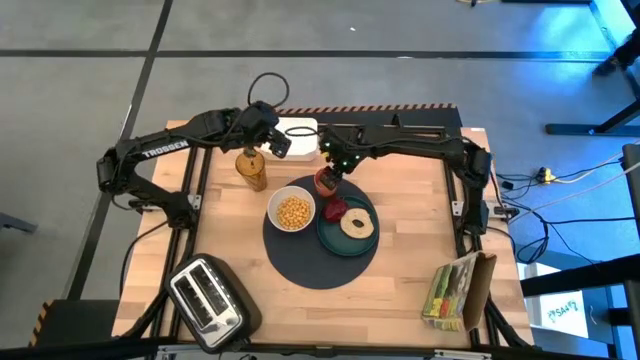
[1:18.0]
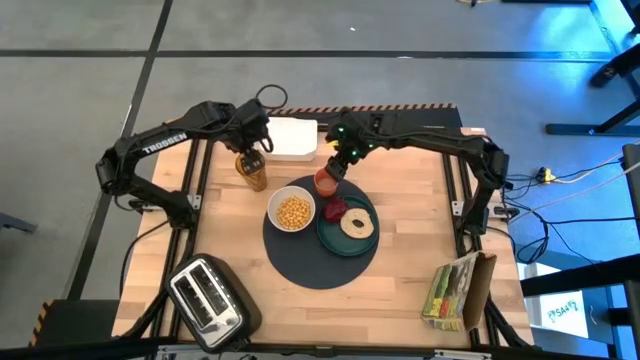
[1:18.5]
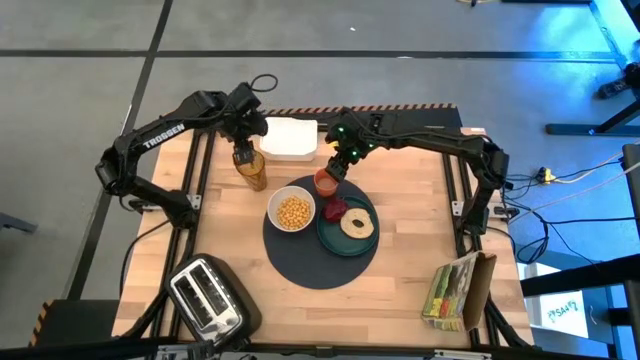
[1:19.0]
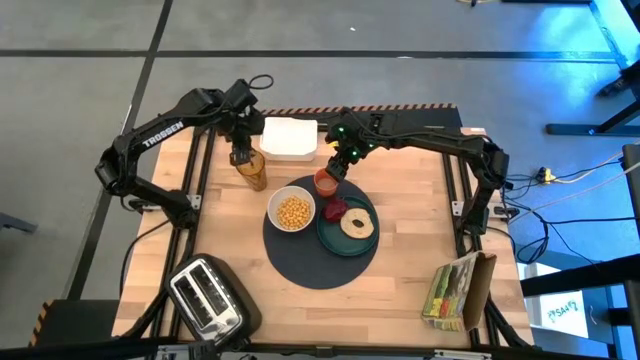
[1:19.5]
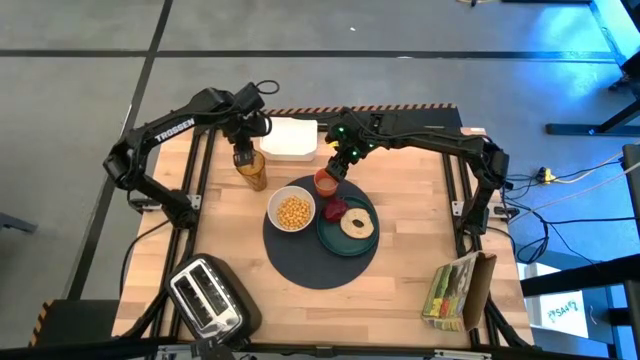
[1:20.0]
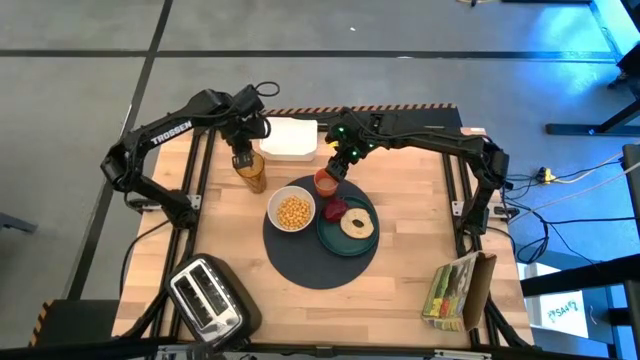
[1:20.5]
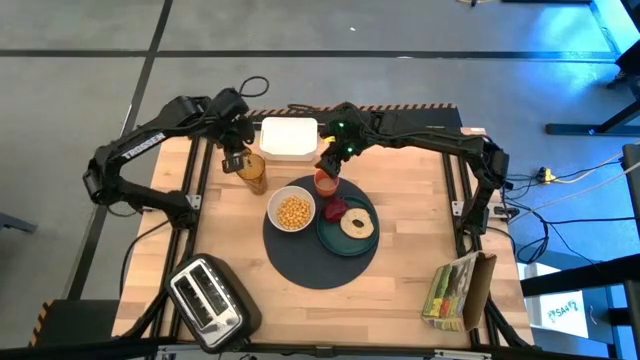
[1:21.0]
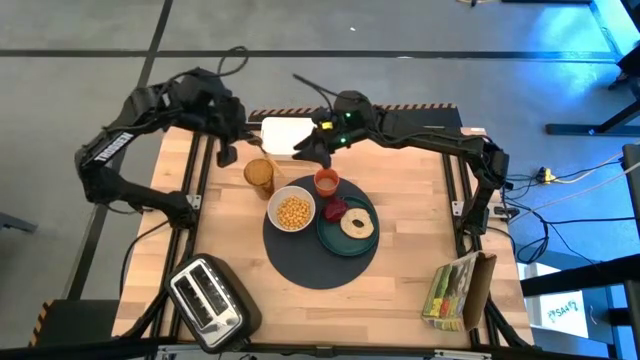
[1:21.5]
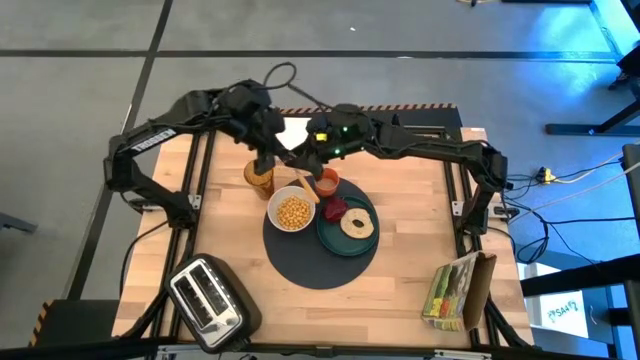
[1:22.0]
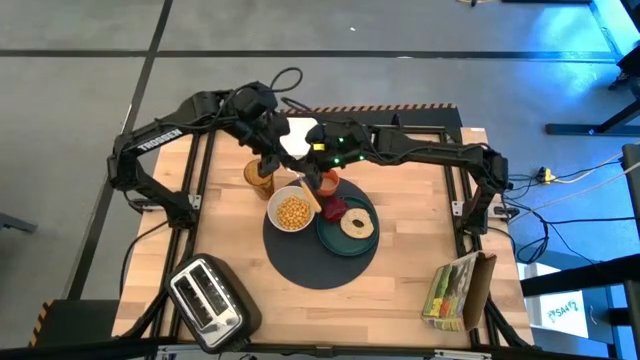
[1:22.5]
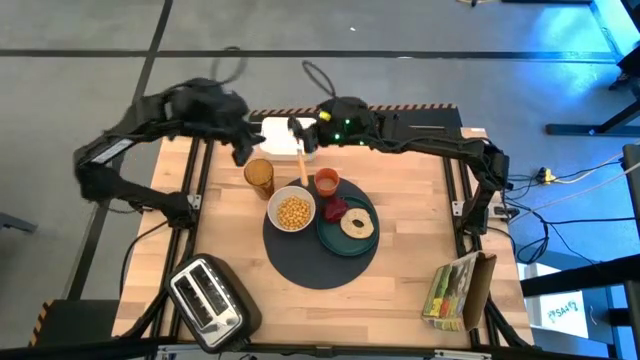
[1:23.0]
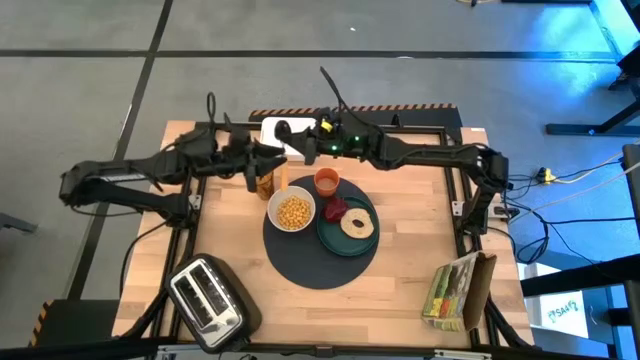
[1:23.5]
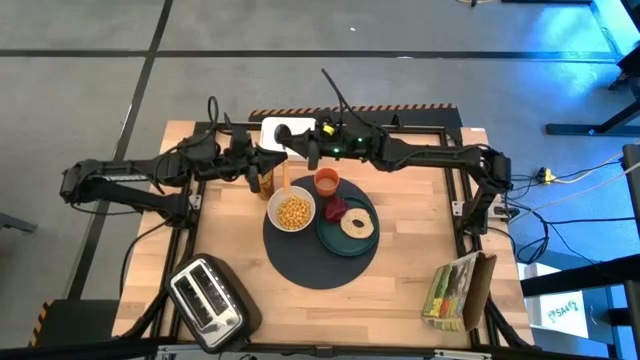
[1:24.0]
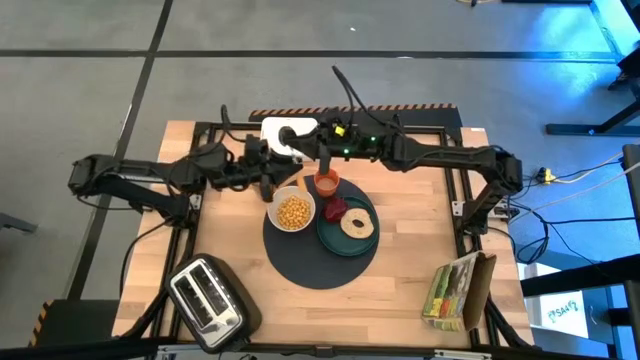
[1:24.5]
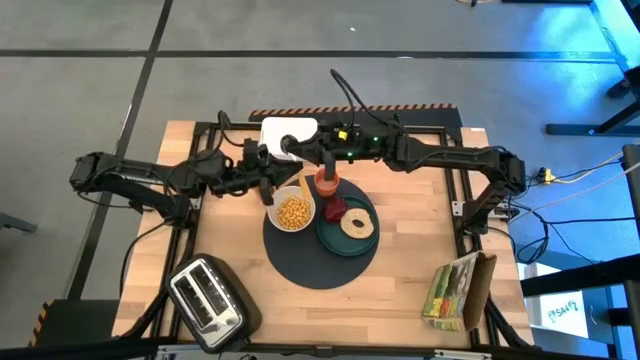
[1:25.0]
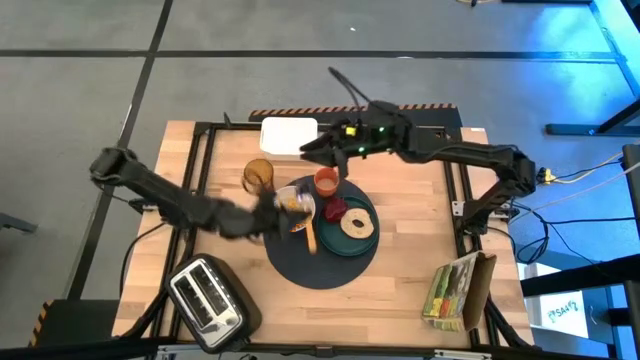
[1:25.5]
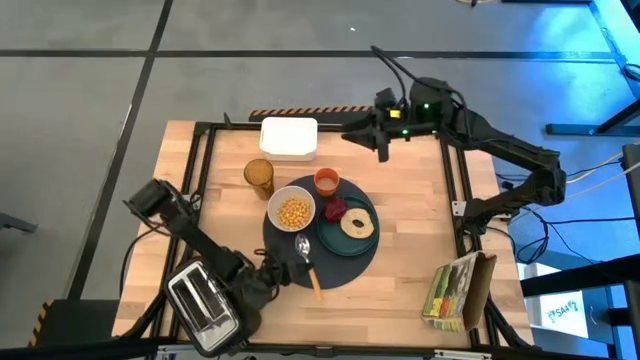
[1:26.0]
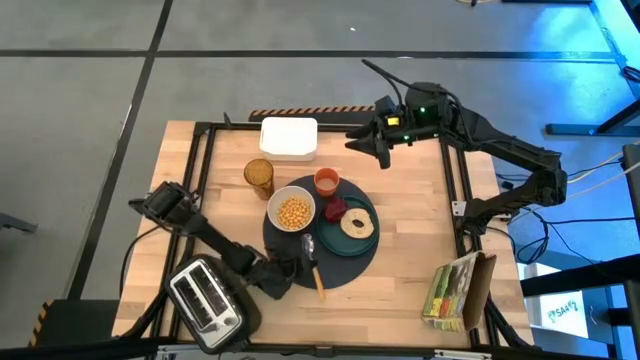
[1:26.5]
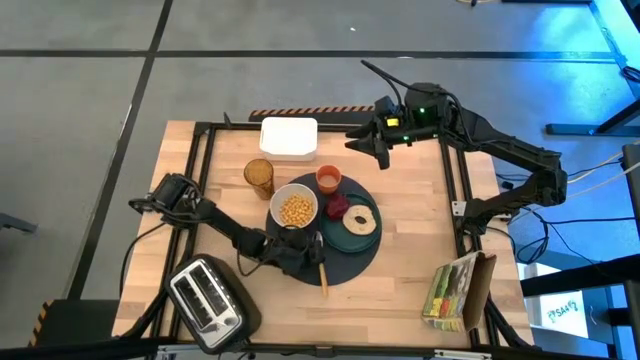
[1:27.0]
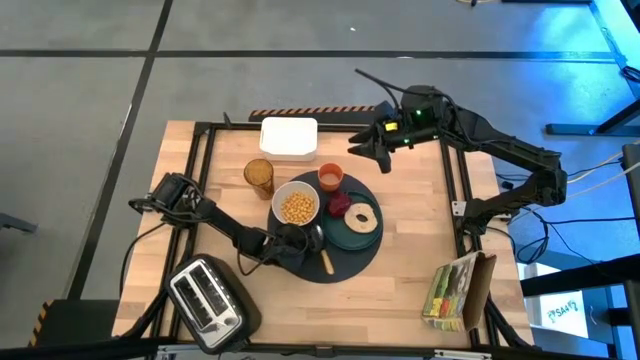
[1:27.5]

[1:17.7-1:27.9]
Task: Arrange a breakfast setting
Put the yellow spoon to the bottom left of the green plate

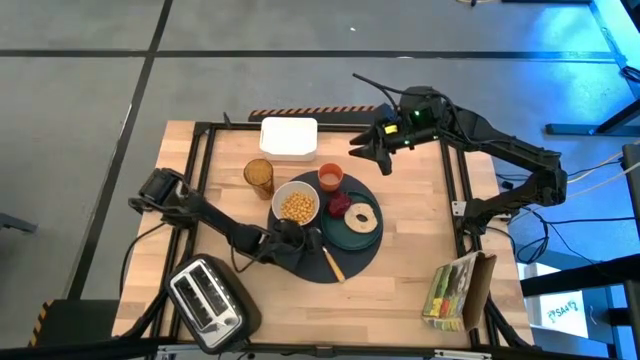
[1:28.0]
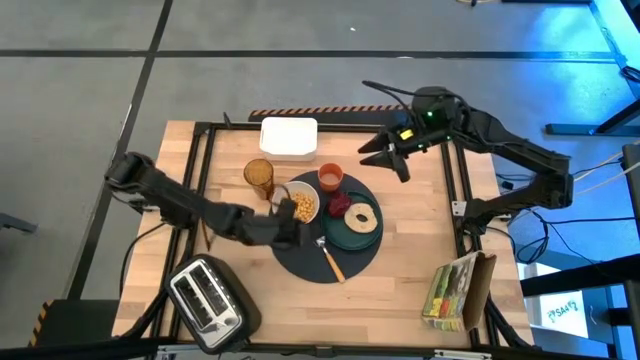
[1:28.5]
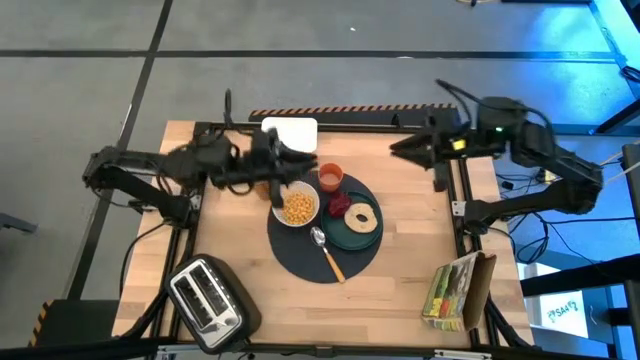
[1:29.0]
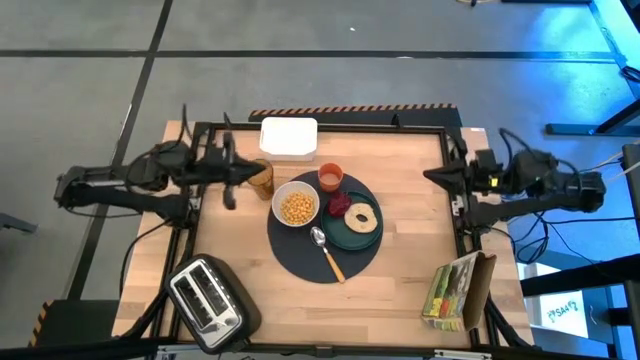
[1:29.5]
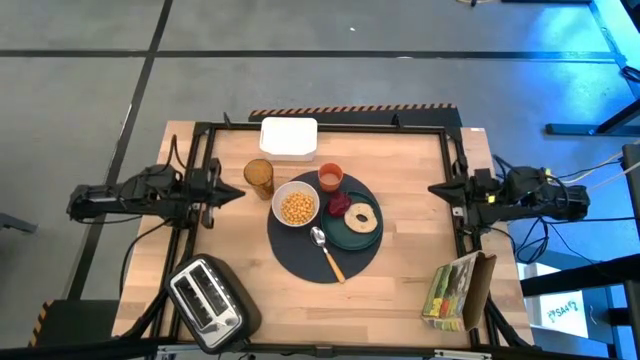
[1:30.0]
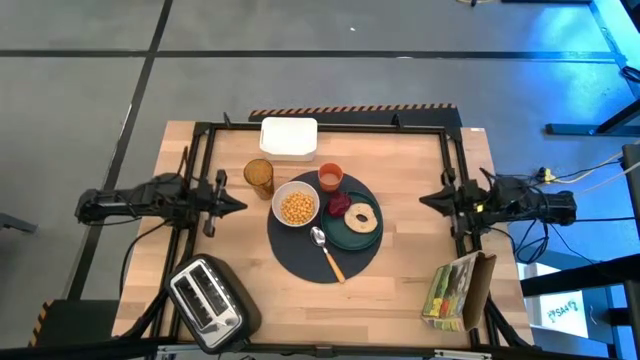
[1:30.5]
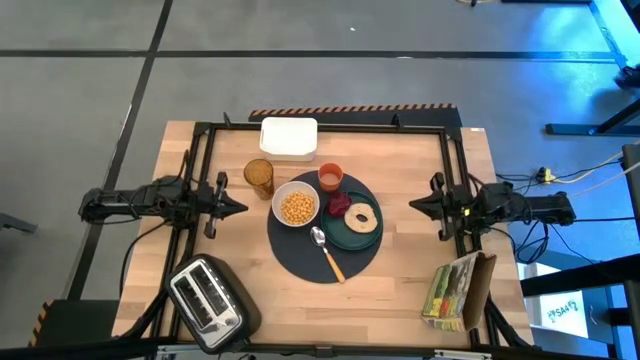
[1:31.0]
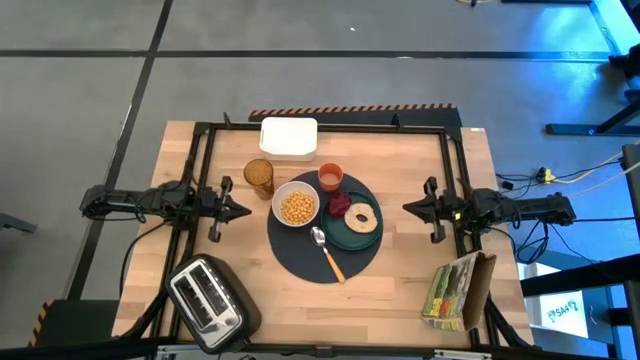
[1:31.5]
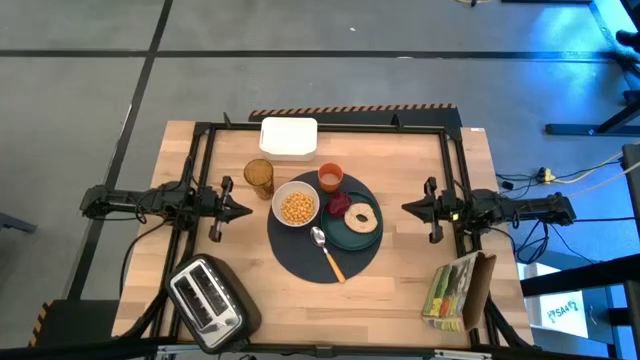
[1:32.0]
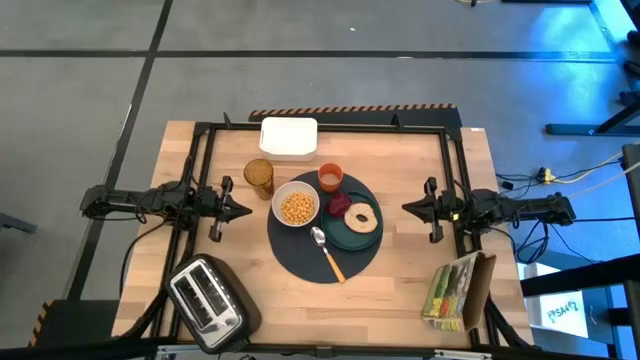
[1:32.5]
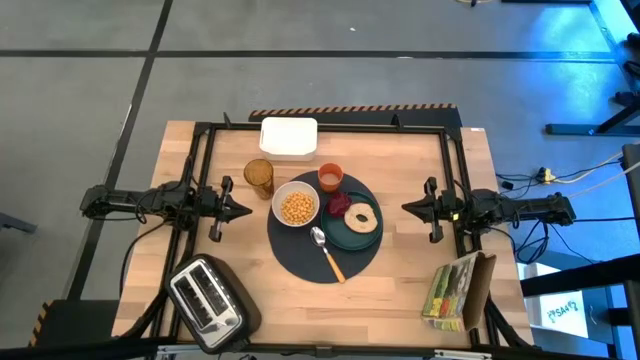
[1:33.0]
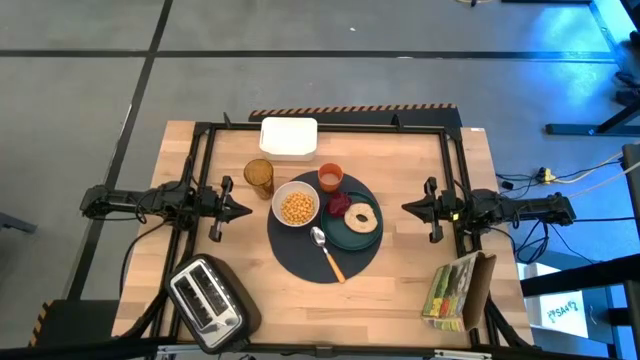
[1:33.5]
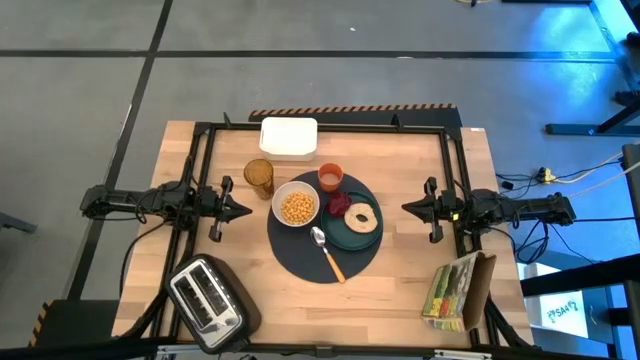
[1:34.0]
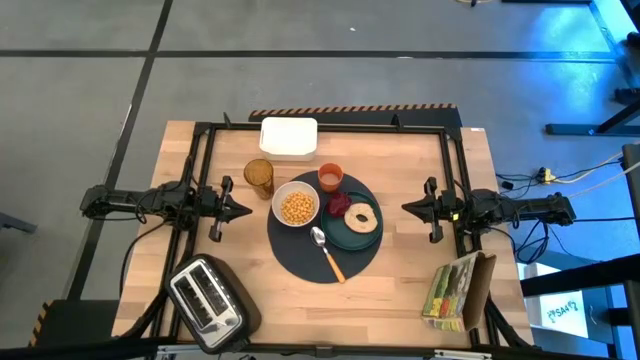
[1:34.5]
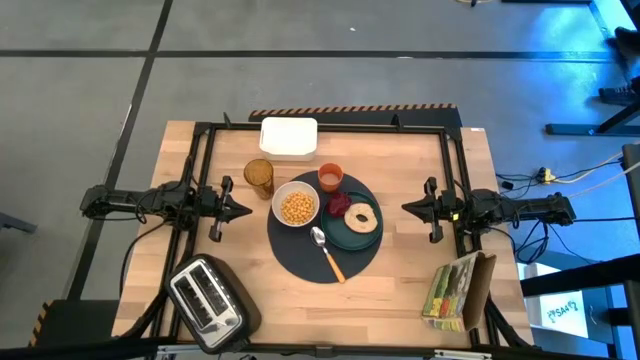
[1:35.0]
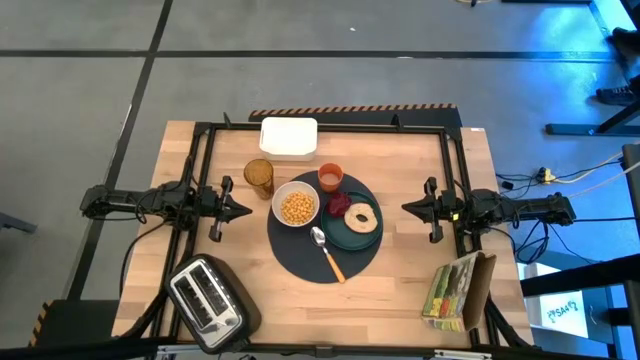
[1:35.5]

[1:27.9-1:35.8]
Return to Home Position

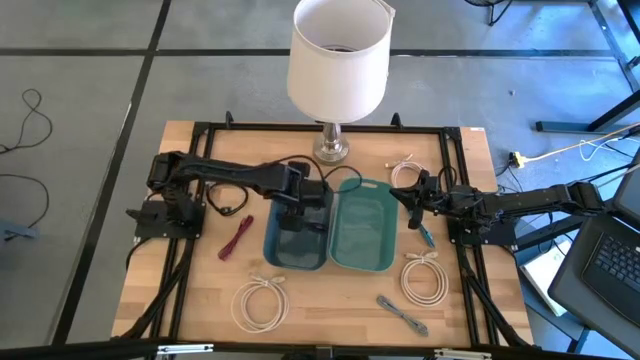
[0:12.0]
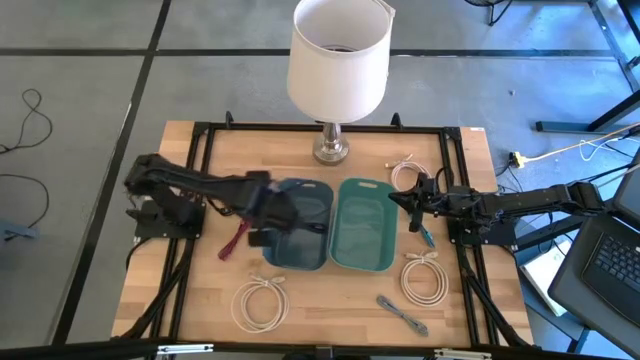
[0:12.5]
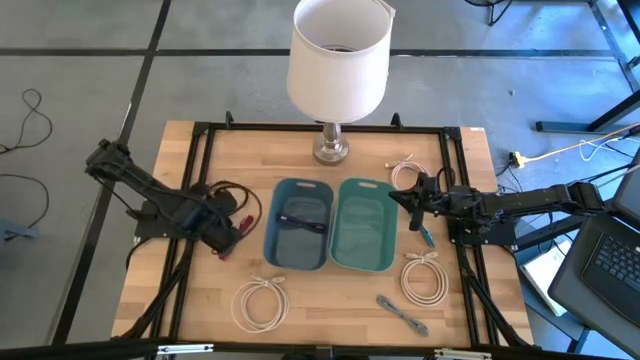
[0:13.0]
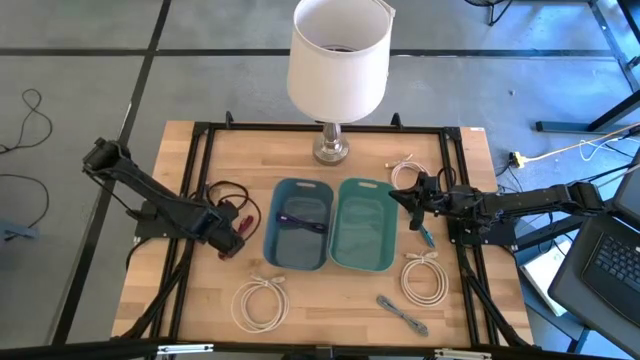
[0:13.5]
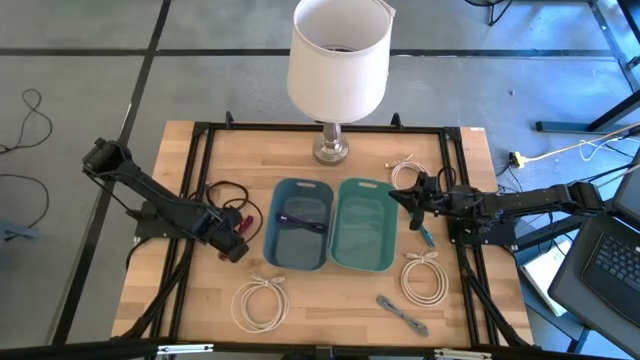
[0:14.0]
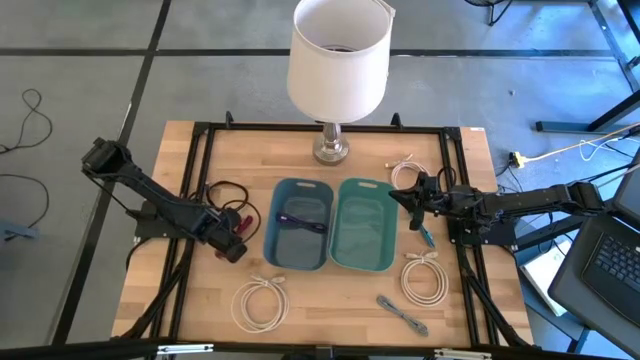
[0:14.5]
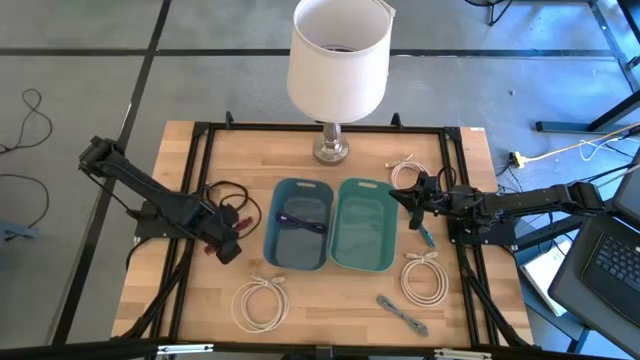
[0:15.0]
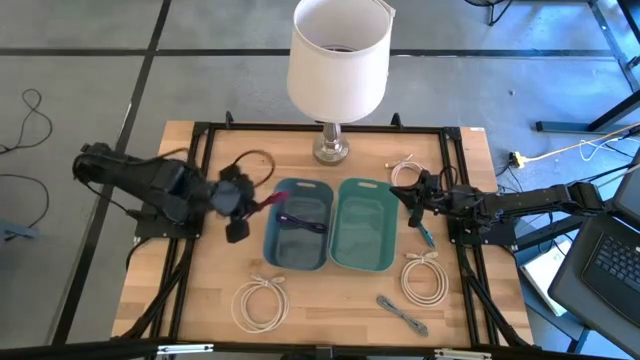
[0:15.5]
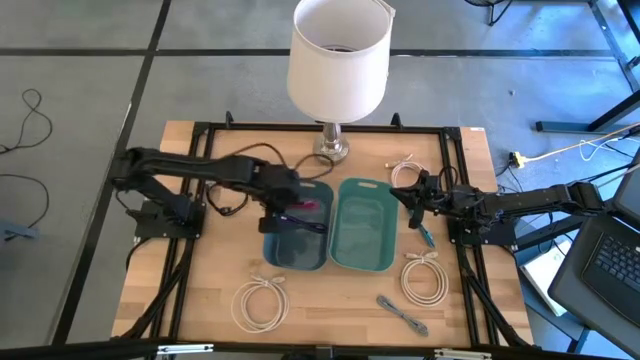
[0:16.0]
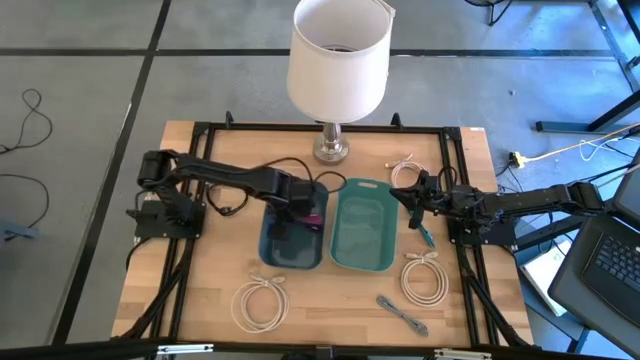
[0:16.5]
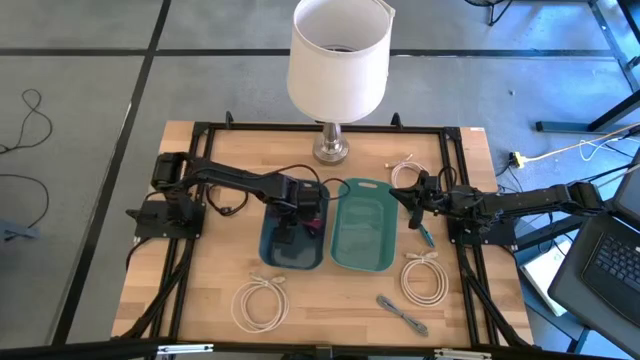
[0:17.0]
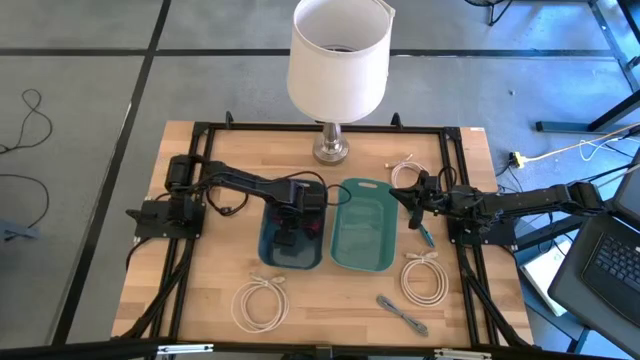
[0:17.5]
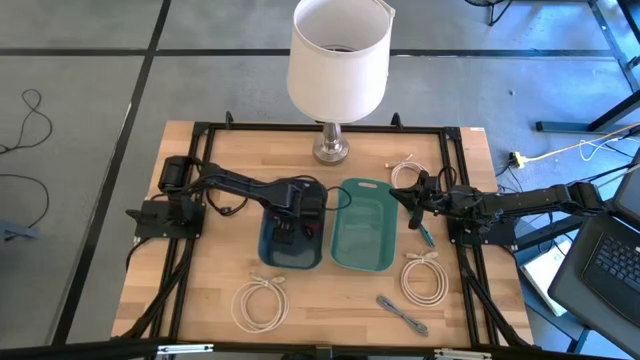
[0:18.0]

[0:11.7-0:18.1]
Task: Pick and place items into bin
Put the red patterned USB cable into the blue bin
